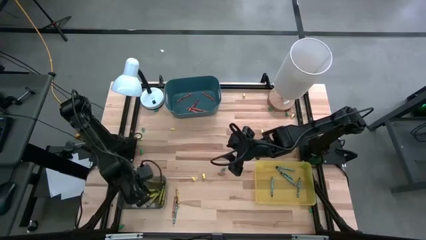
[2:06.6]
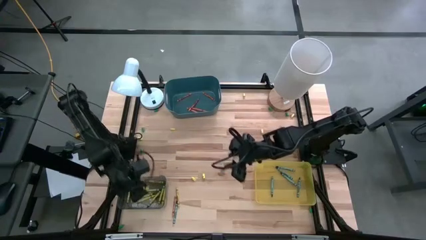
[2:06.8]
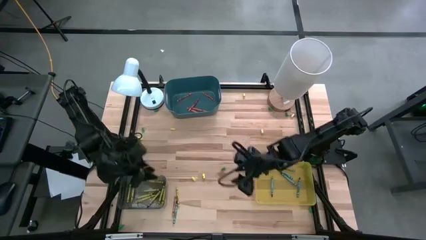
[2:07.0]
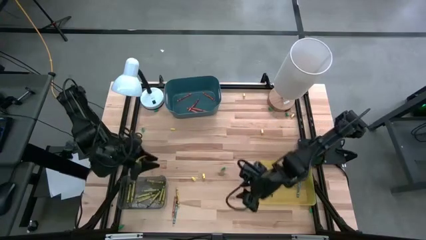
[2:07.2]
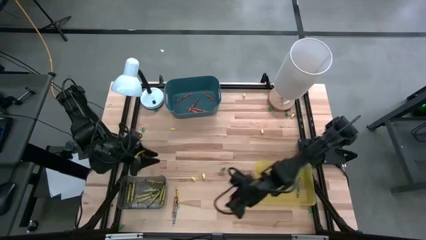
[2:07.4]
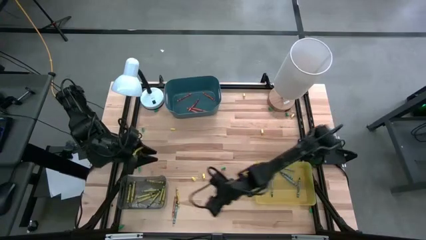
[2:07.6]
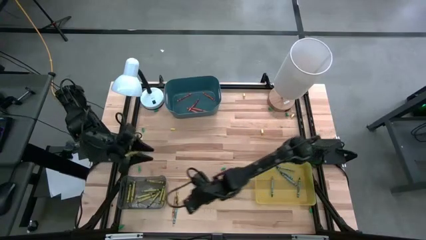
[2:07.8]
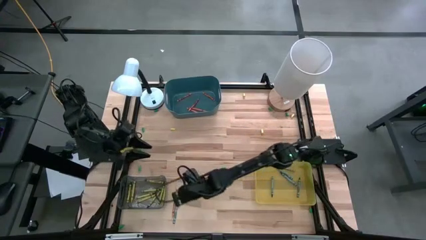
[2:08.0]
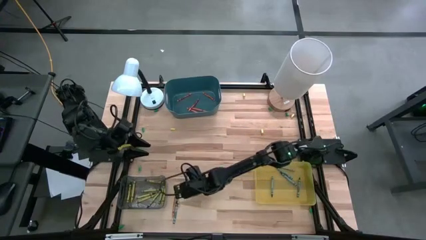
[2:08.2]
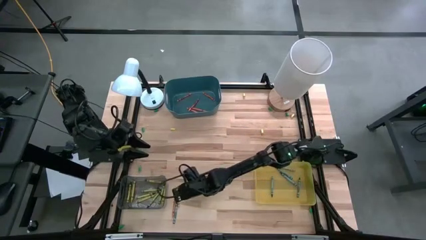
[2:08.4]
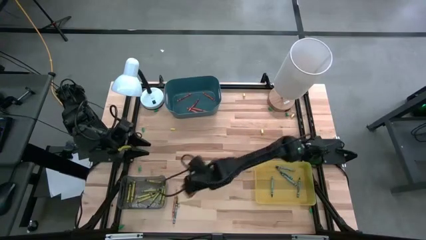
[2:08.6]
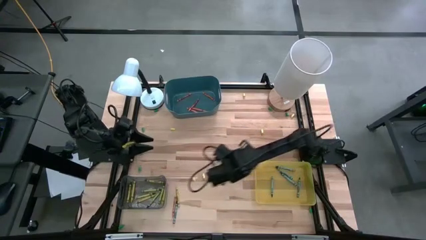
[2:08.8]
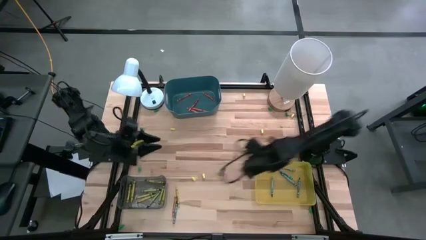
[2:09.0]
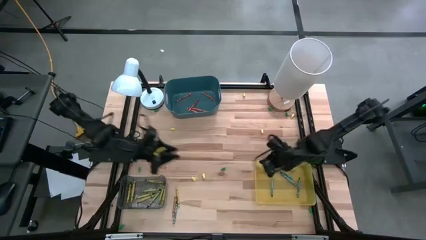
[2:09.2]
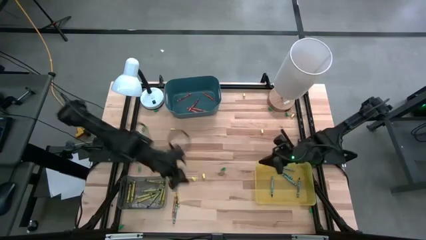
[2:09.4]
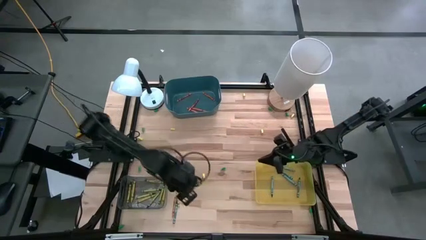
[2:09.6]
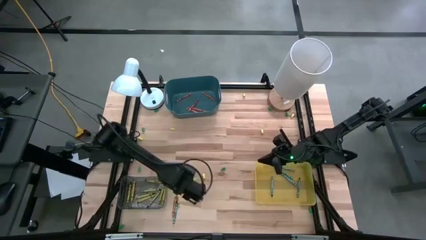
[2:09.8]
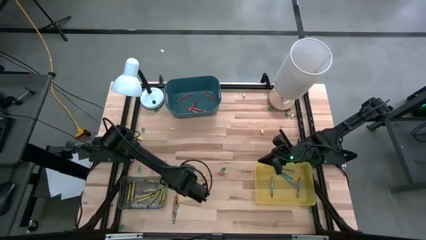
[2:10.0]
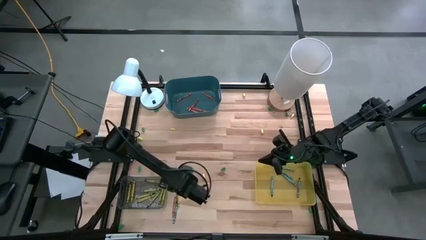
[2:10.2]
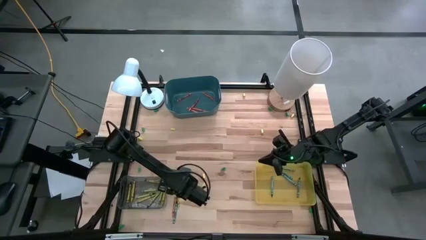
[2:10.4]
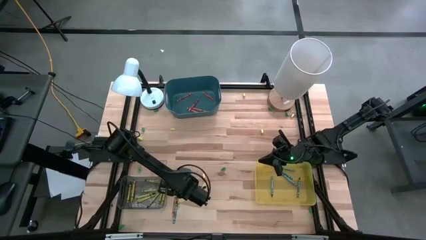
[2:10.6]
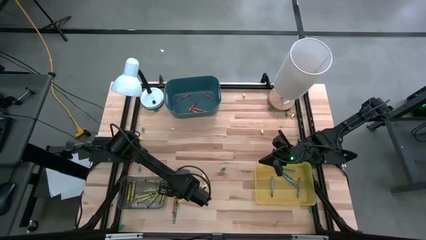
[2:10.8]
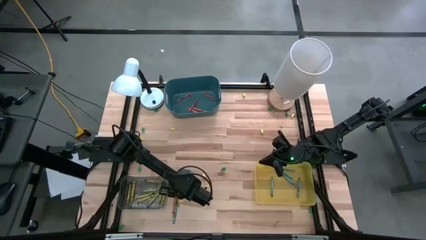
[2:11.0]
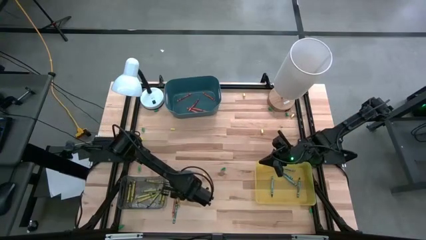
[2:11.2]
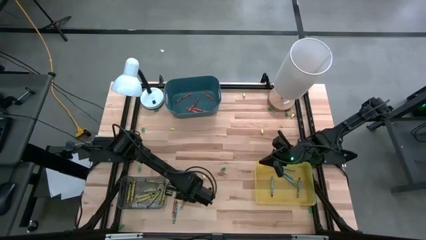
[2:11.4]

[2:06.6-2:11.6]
Task: Sort crayons
Put the yellow crayon into the gray bin

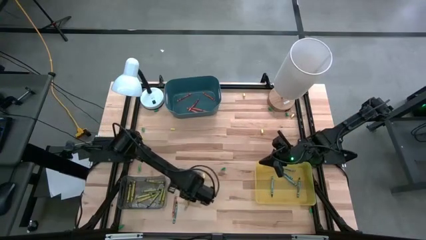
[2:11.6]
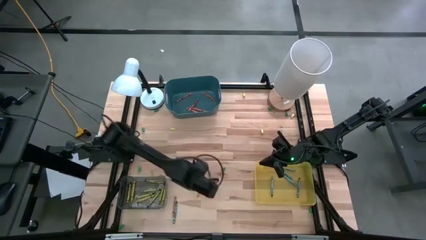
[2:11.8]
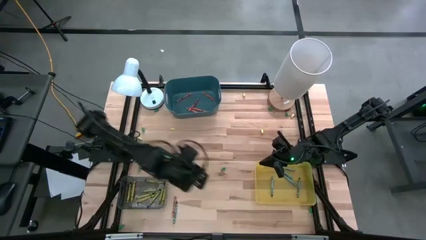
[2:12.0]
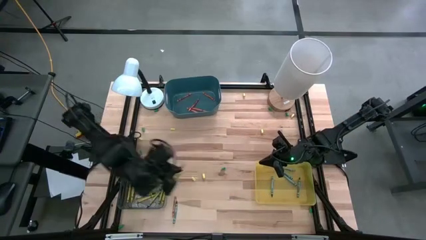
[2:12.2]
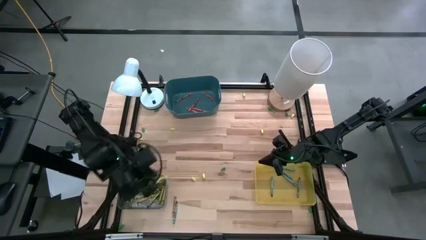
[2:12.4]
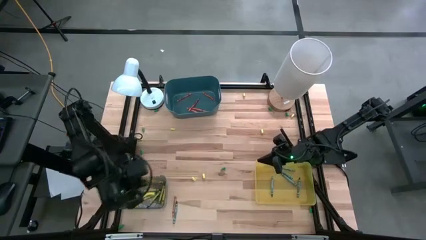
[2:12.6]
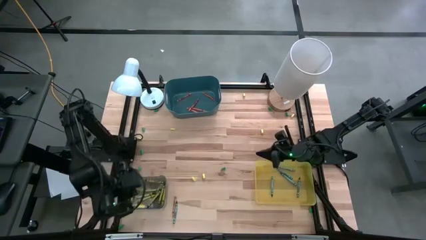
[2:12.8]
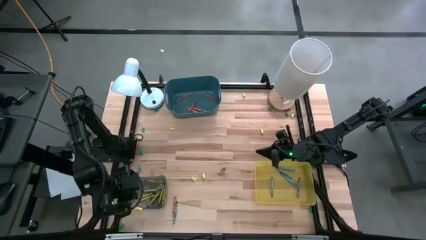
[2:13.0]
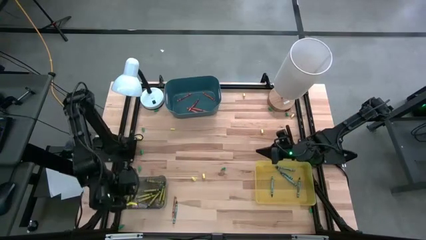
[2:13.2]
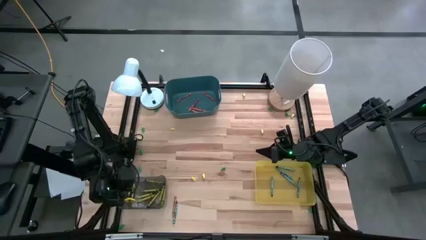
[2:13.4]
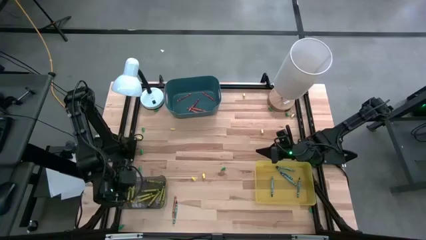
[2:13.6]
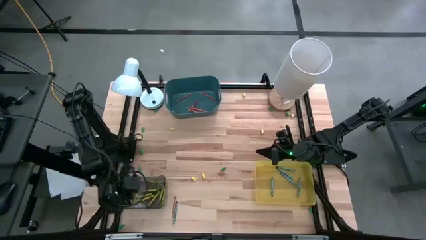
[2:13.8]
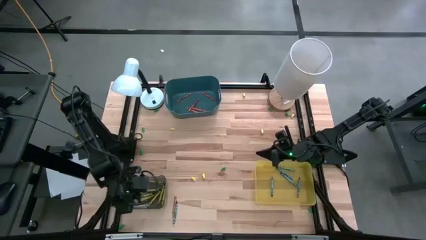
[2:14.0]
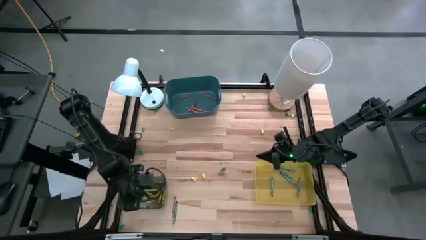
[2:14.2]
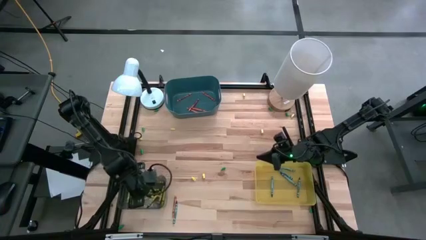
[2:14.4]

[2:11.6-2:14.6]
Put the yellow crayon into the gray bin

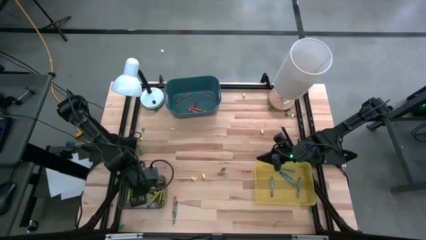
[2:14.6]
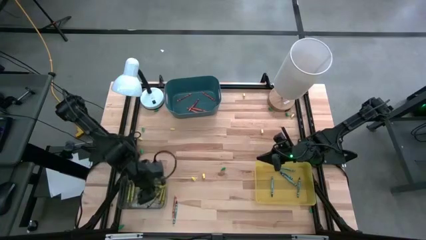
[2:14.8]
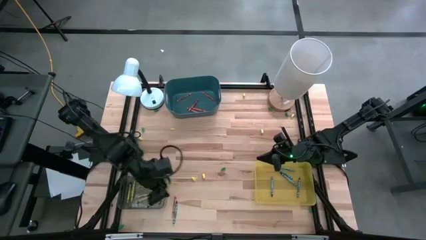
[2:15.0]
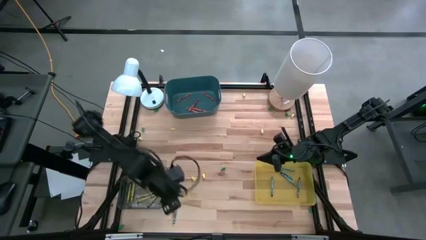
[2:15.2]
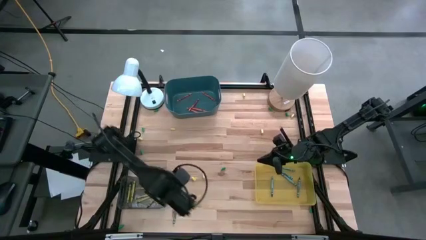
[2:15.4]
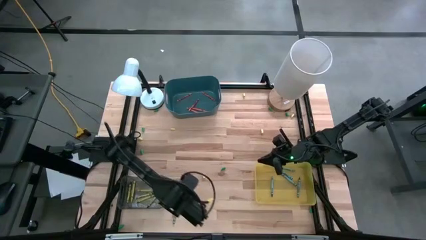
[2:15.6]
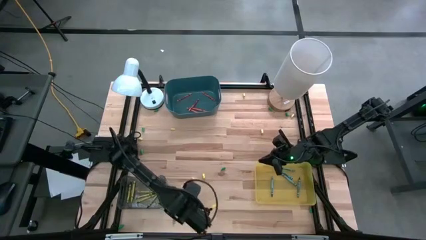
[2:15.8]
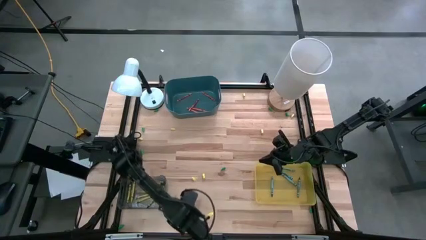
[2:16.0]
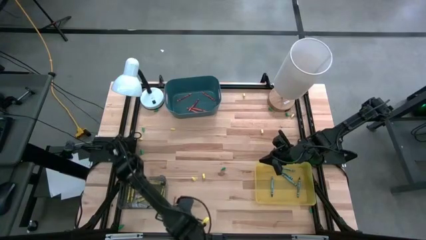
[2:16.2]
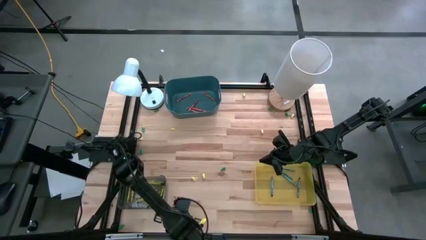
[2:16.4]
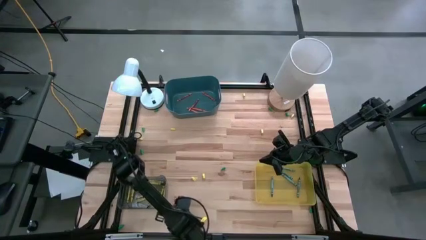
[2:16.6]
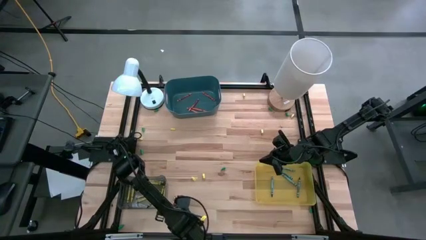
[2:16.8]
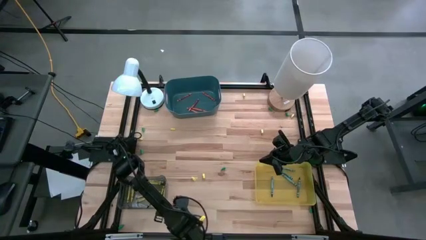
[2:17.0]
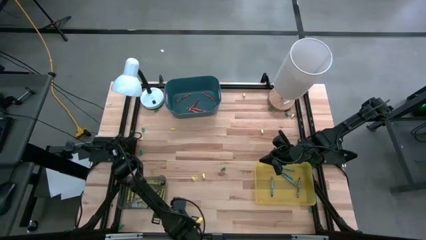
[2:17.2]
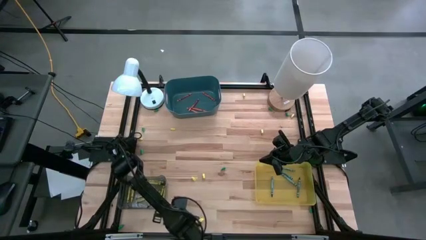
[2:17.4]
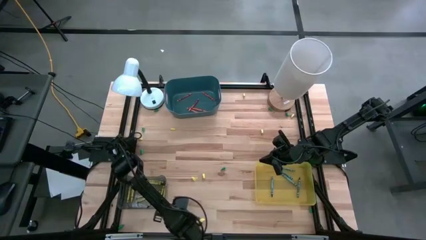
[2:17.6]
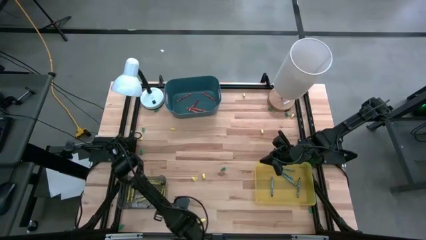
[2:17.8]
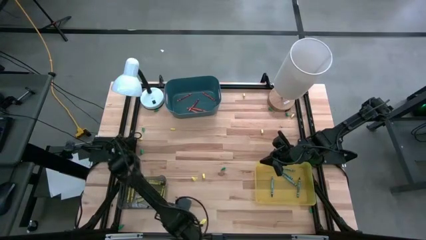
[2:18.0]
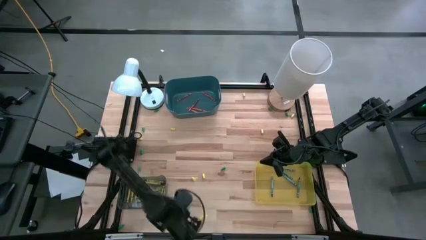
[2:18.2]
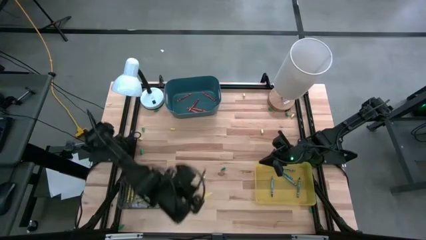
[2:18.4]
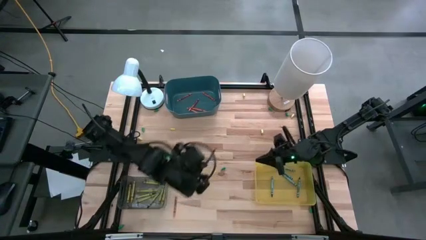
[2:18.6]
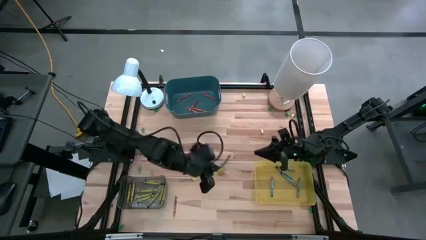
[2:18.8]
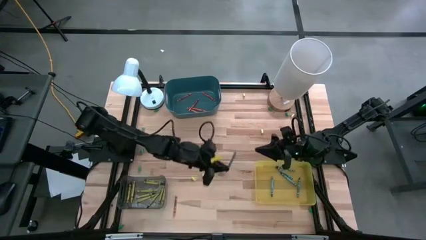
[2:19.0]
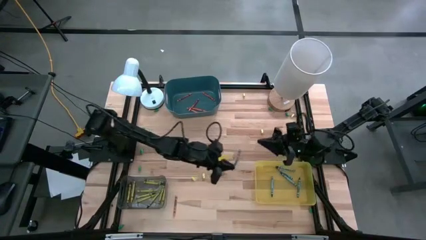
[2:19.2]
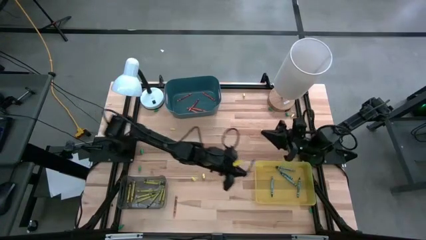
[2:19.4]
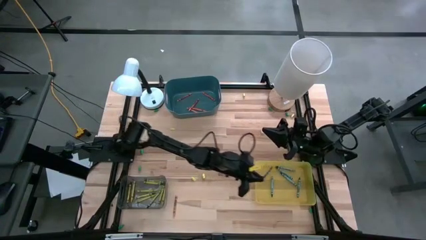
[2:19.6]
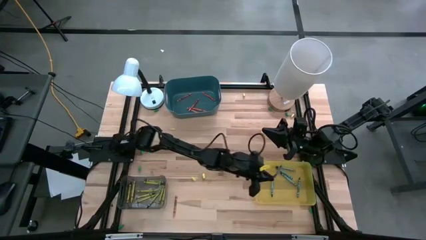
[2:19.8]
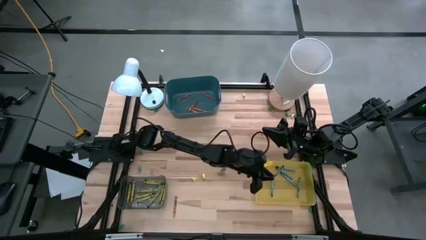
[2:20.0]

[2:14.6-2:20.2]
Put the blue crayon into the yellow bin

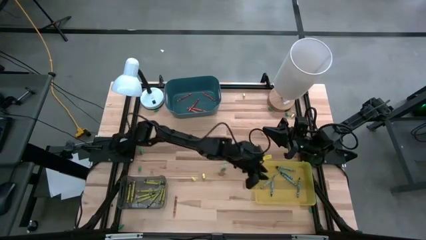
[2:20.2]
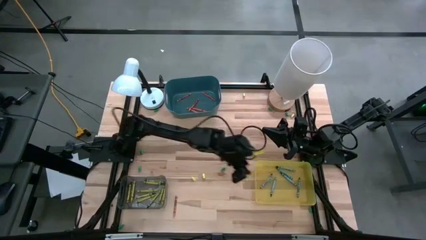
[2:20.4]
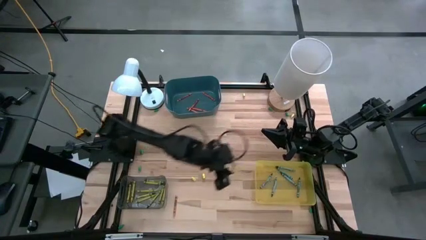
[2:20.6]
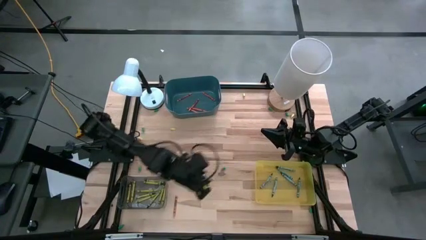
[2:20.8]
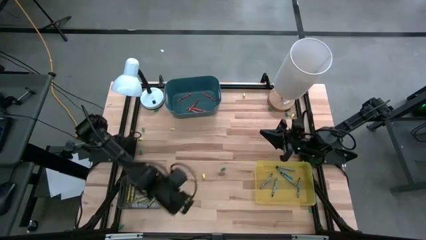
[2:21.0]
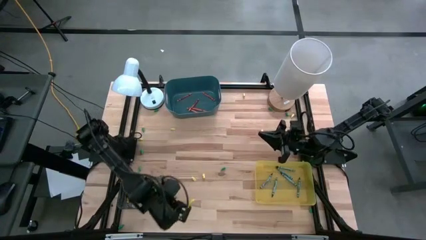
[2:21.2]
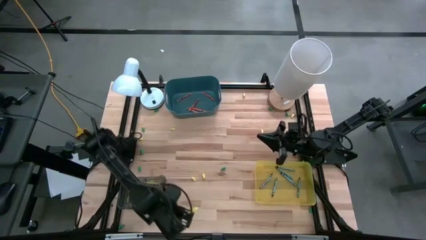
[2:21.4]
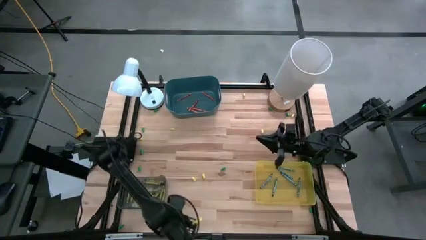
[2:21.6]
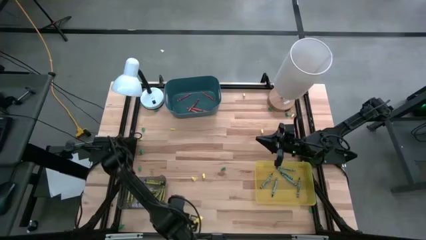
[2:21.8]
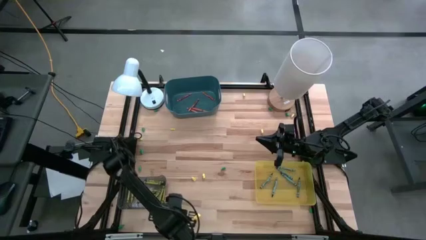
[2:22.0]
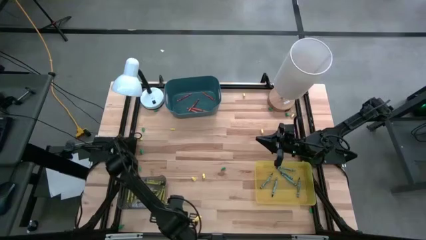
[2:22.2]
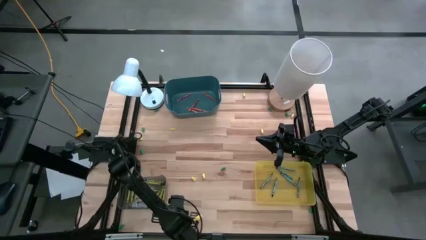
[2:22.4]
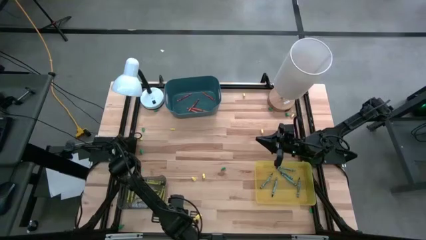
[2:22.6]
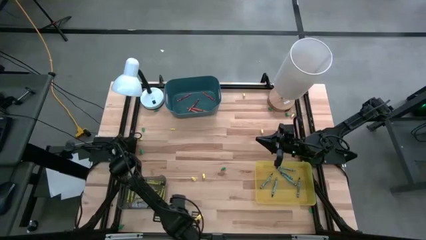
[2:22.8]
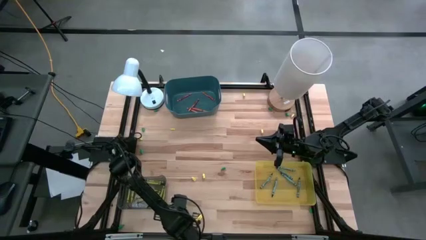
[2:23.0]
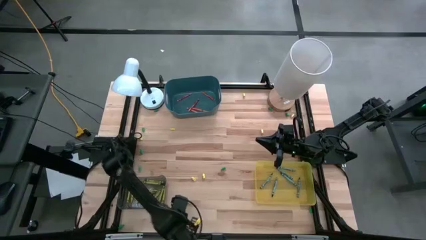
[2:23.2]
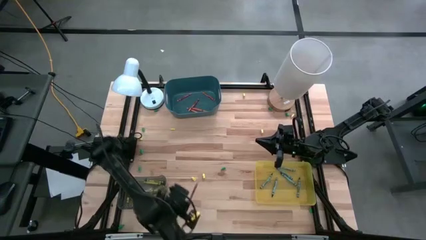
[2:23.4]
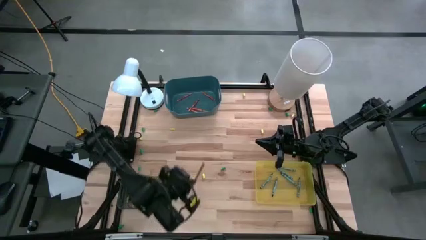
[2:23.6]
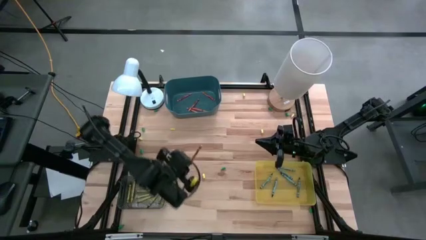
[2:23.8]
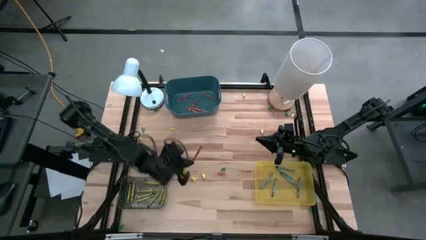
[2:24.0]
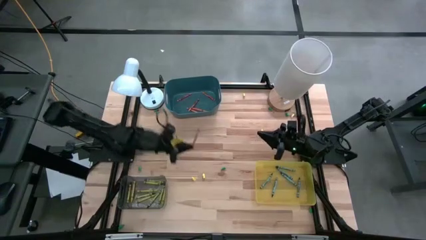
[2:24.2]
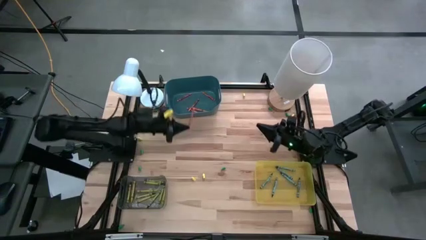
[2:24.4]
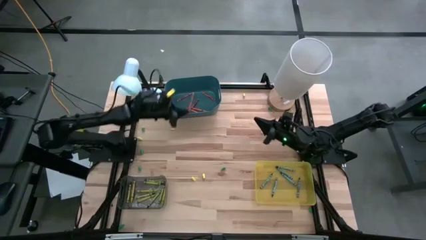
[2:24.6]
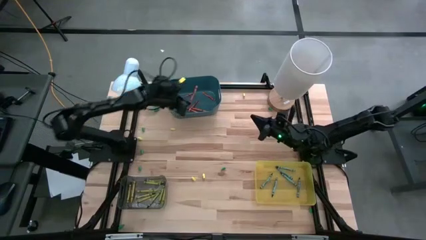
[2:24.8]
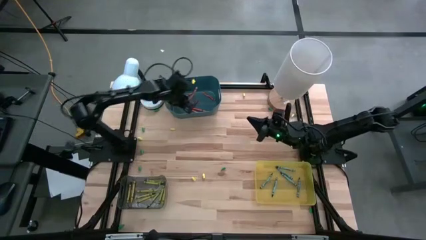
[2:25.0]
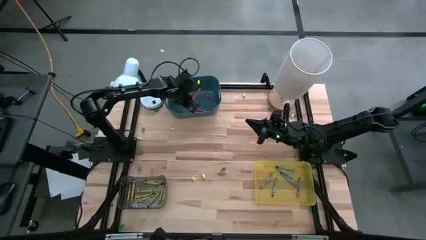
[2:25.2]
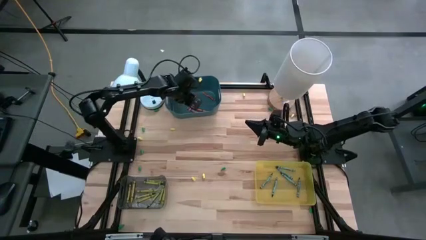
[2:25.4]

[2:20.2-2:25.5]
Put the orange crayon into the green bin
